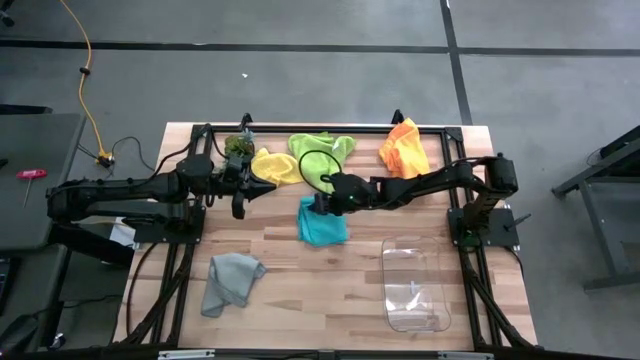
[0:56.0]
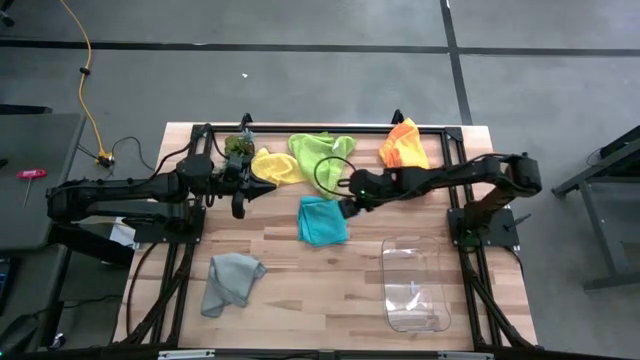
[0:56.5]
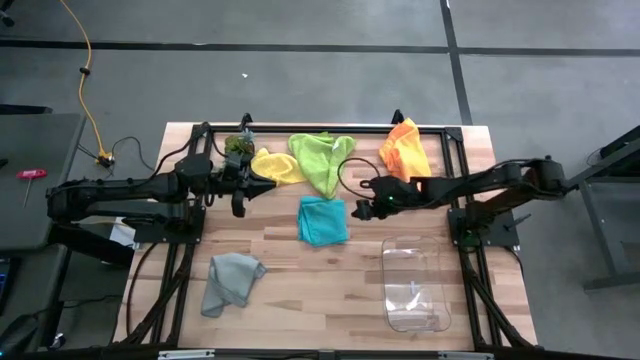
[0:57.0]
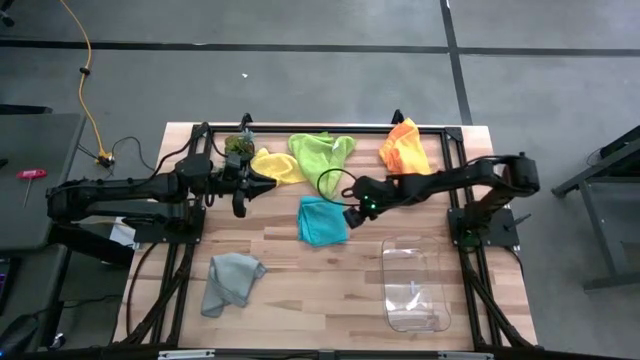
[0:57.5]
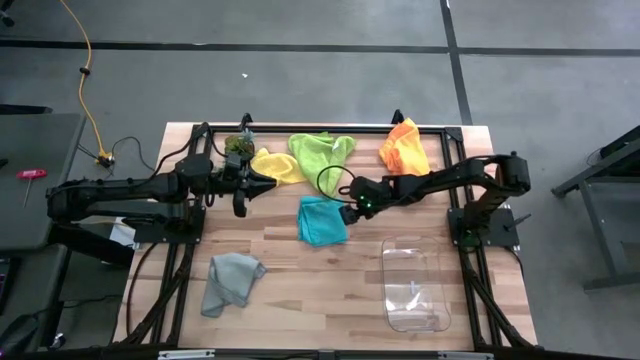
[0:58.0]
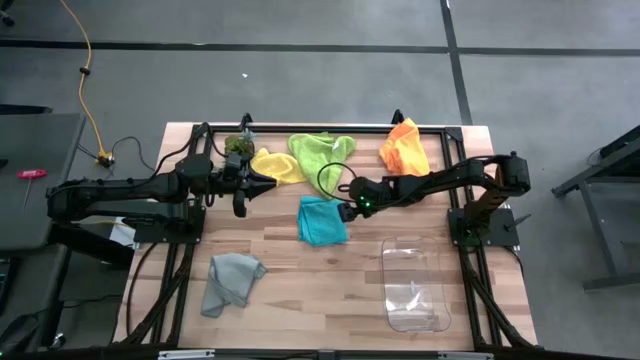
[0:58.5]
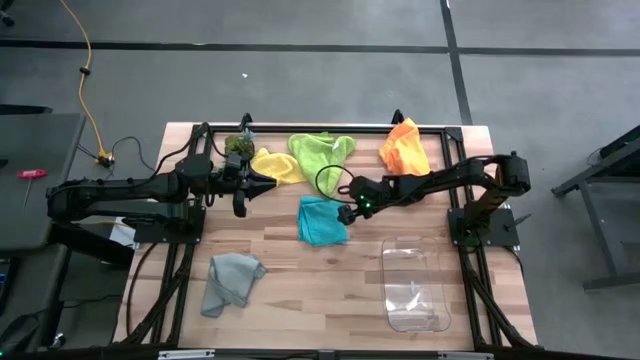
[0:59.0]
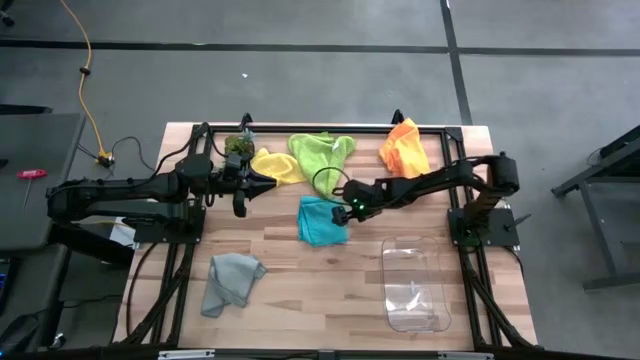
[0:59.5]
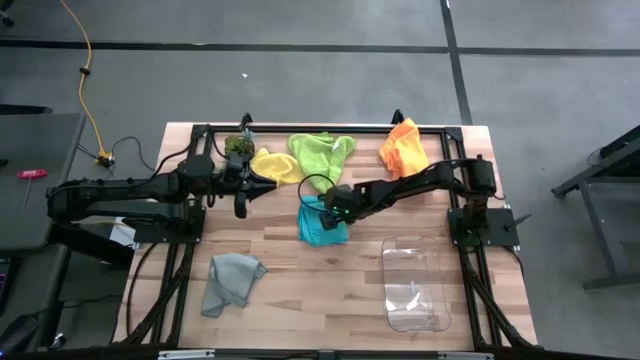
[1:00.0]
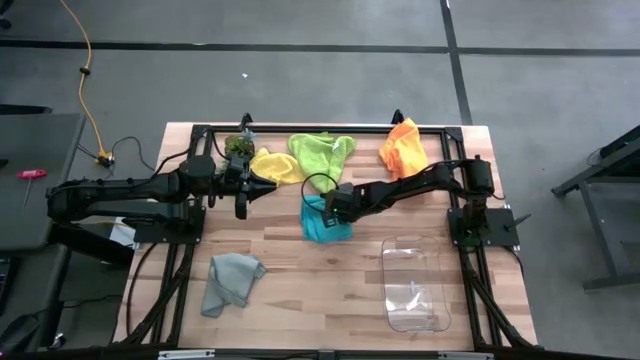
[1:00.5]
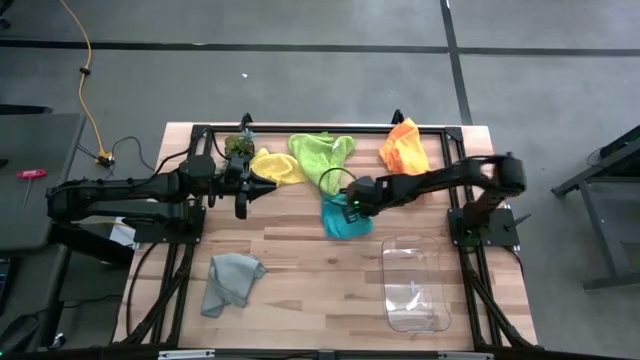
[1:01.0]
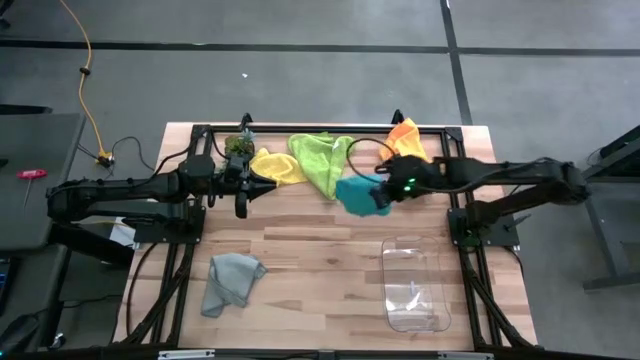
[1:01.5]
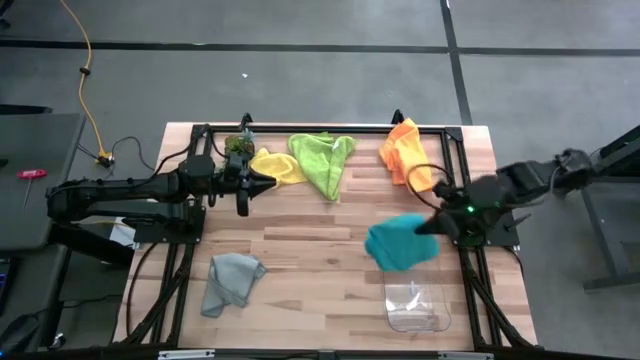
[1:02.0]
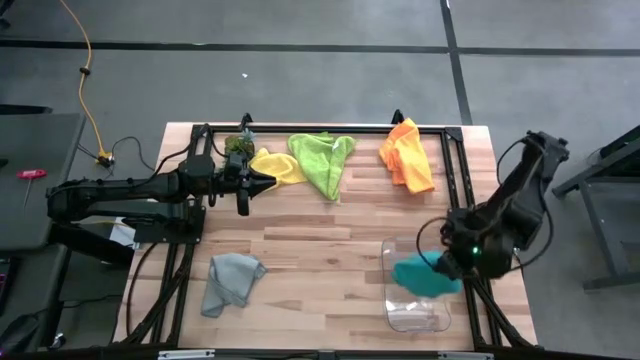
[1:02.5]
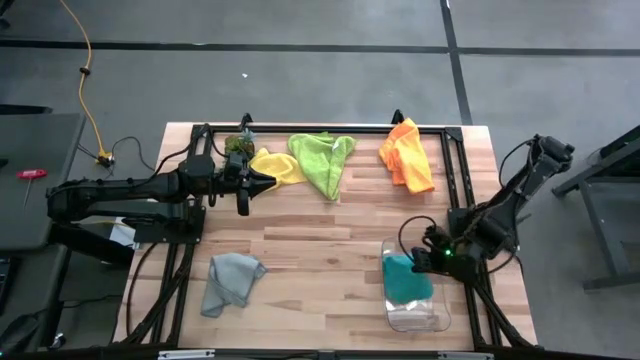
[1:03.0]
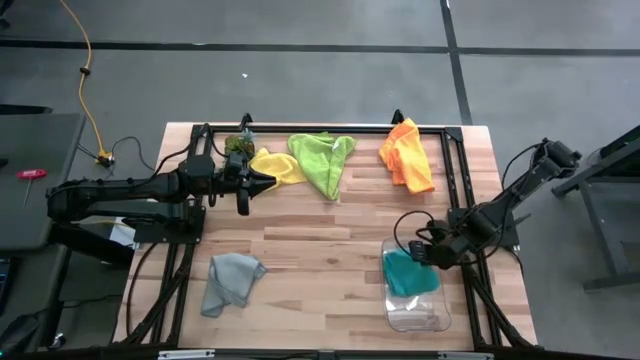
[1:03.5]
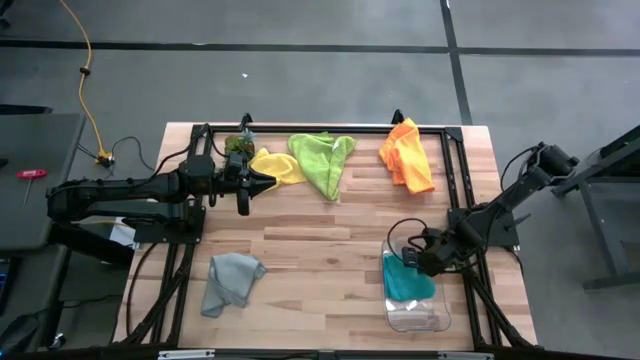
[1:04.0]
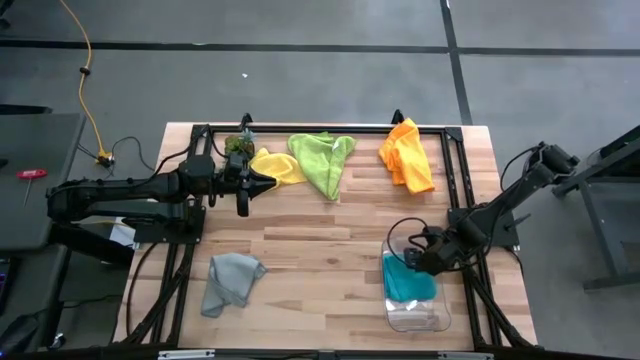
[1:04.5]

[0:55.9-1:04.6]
Task: Fold microfiber towels
Put the folded blue microfiber cloth into the transparent bin

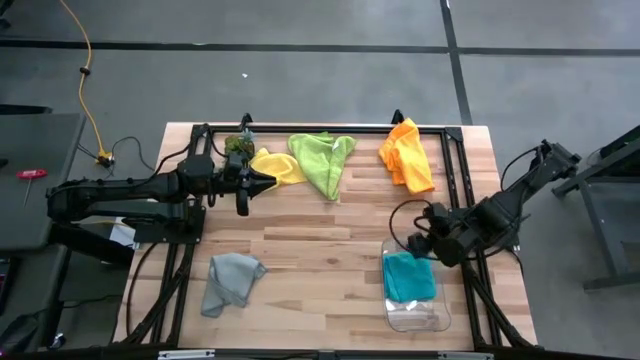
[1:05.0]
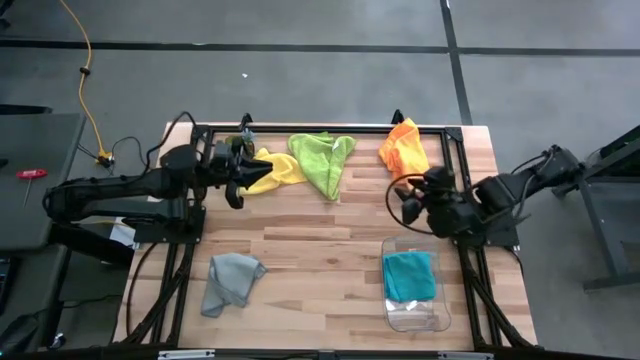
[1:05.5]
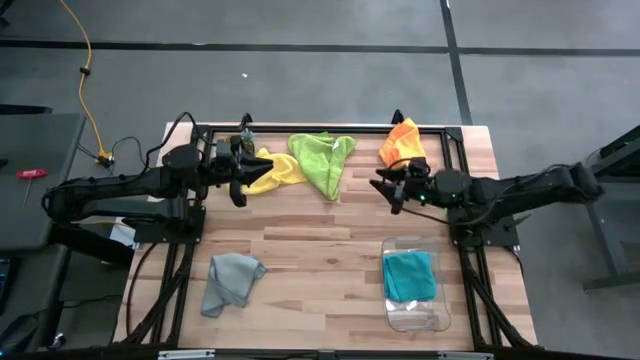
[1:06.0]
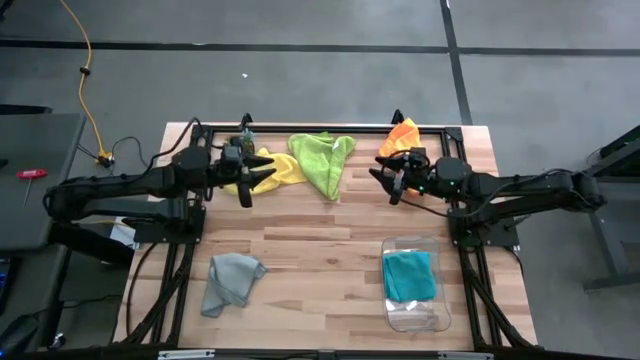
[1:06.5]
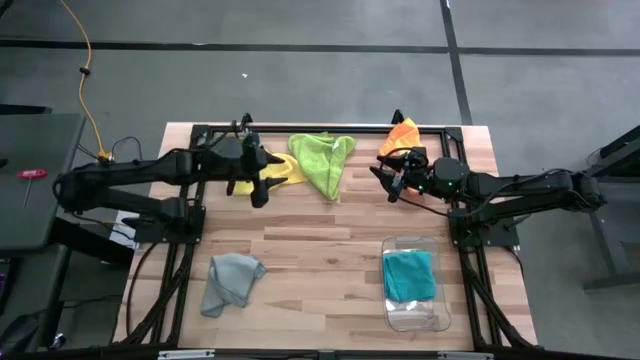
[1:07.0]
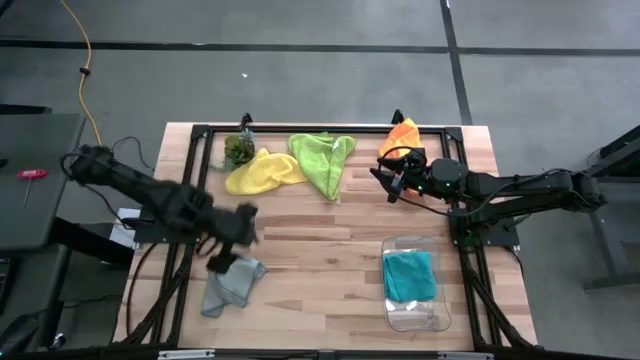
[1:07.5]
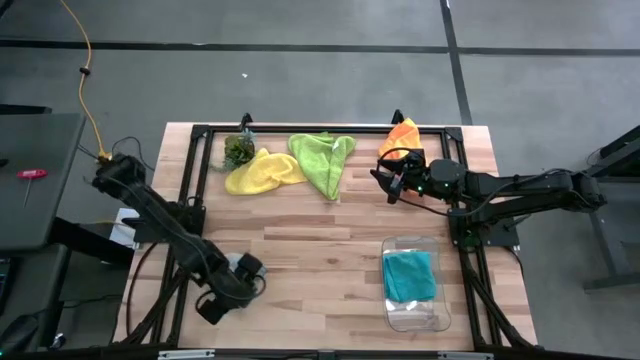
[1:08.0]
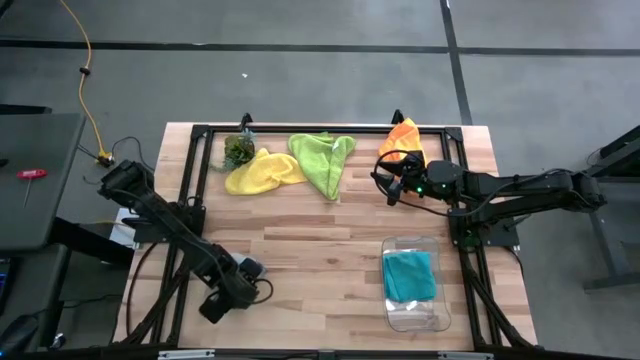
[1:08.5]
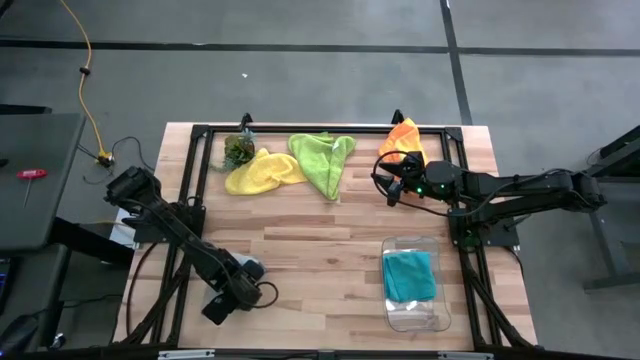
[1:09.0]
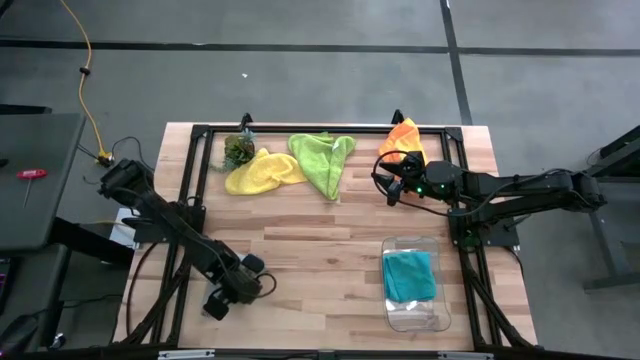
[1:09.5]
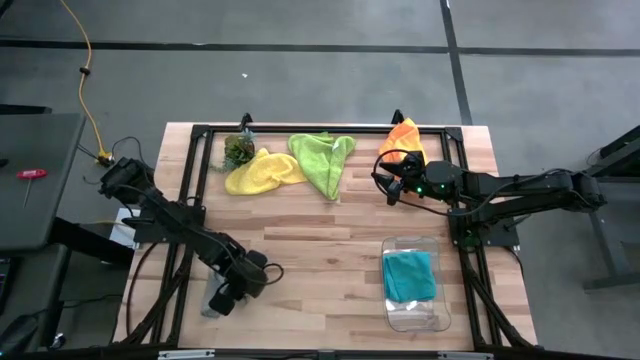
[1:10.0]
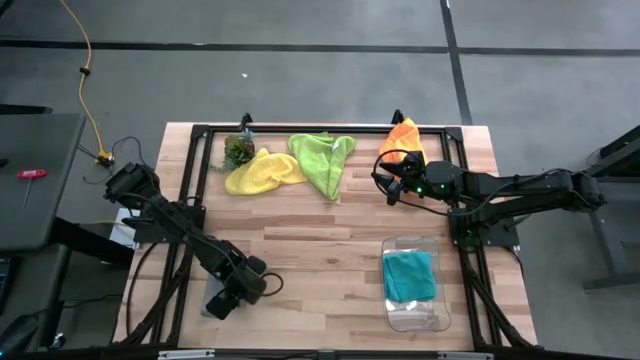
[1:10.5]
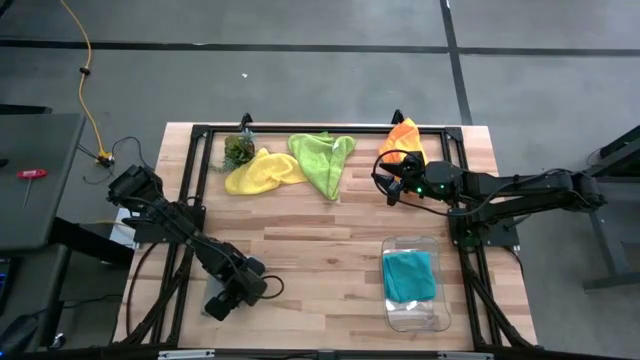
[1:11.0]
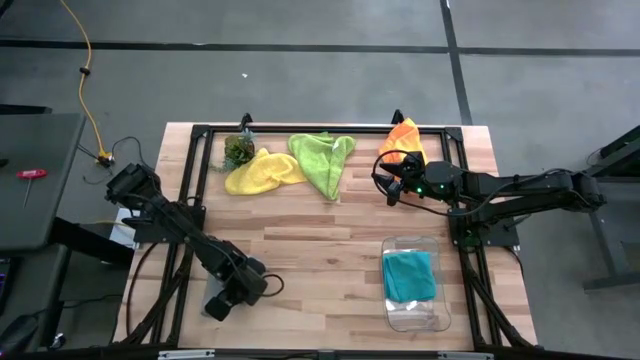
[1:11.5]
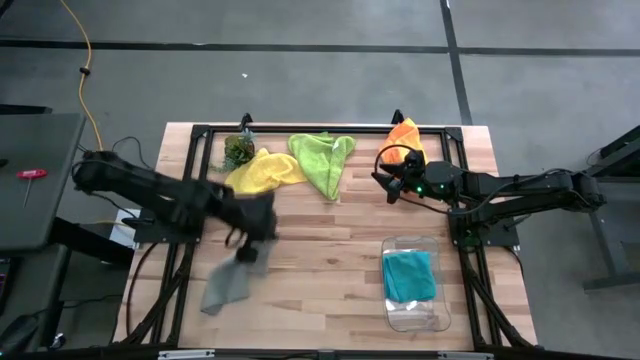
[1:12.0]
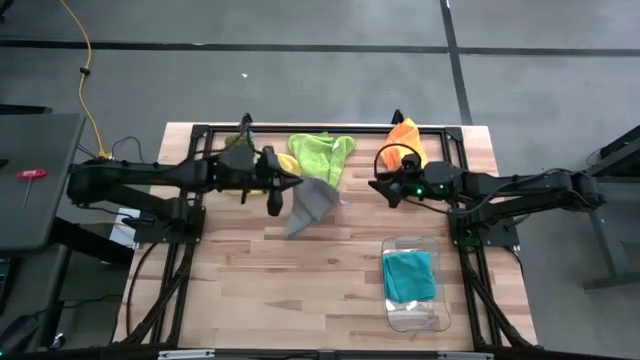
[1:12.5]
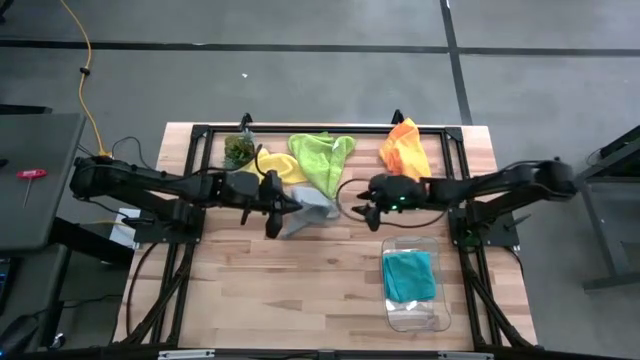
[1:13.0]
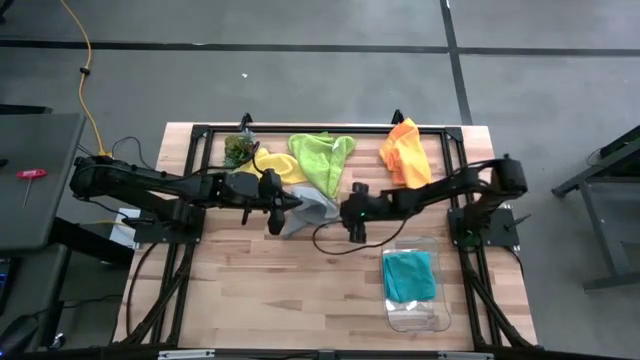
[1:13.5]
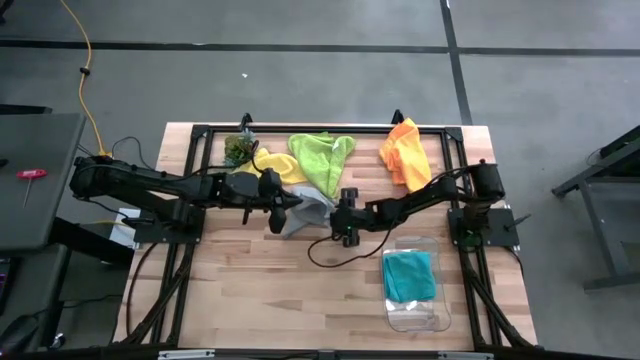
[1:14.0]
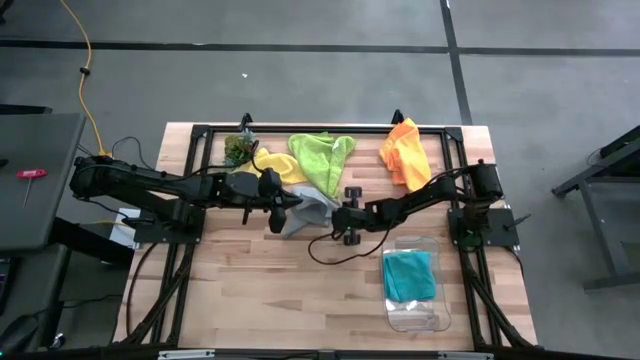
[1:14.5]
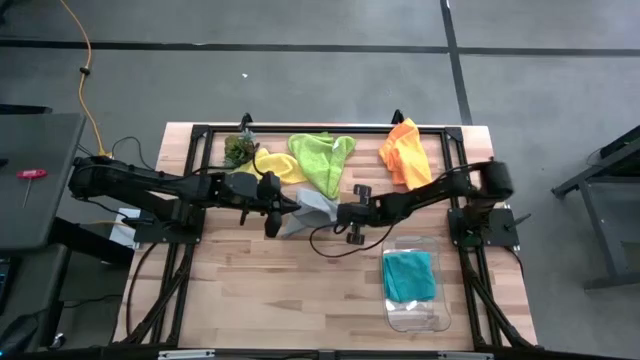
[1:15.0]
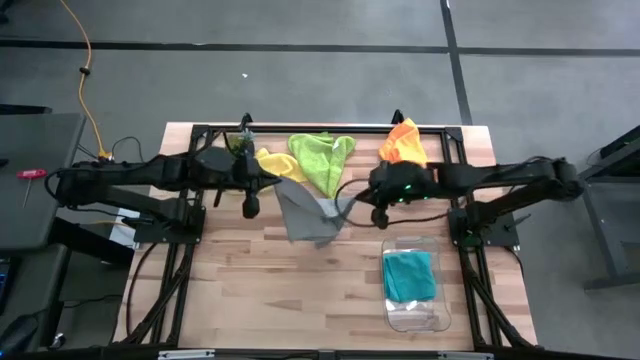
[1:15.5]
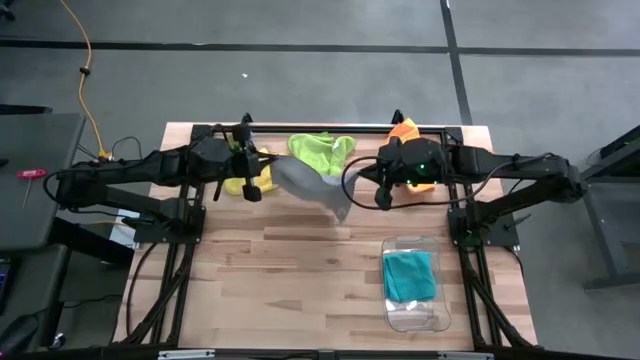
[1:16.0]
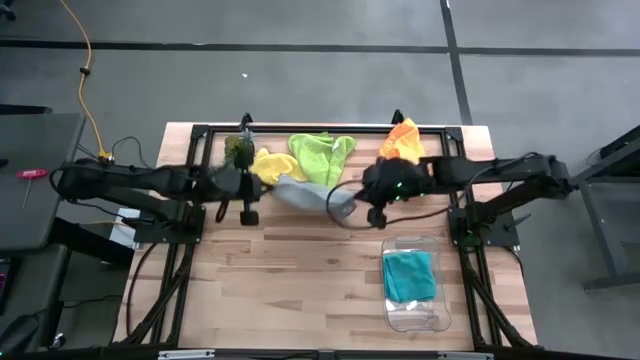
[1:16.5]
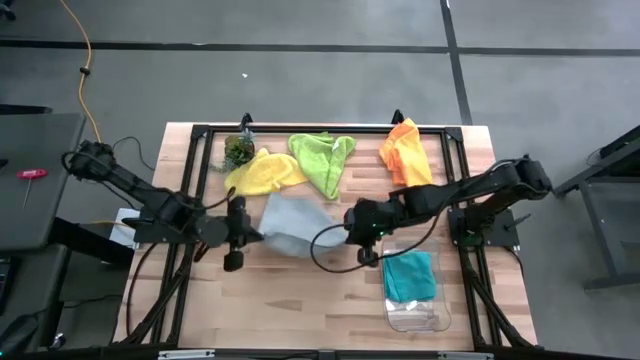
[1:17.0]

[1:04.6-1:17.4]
Fold the gray microfiber cloth
